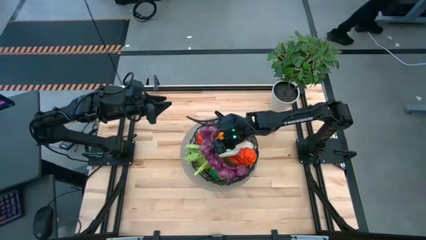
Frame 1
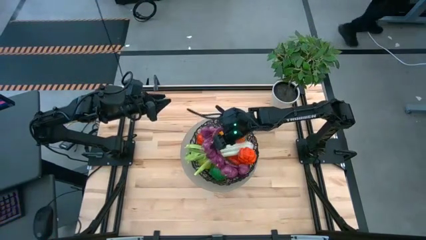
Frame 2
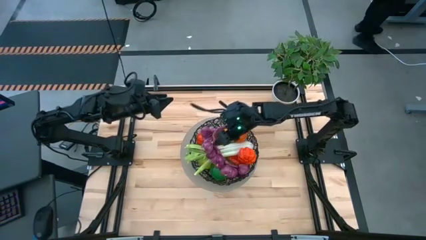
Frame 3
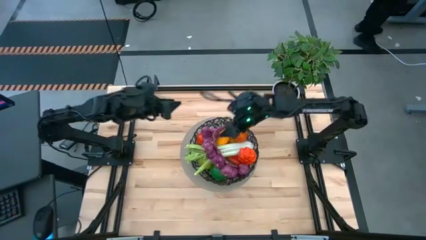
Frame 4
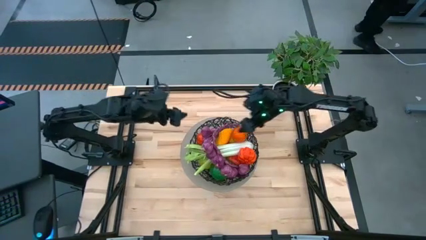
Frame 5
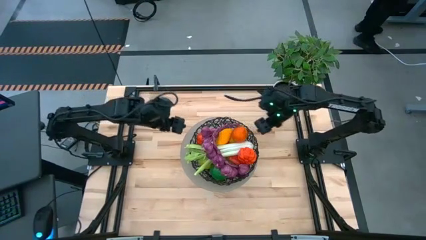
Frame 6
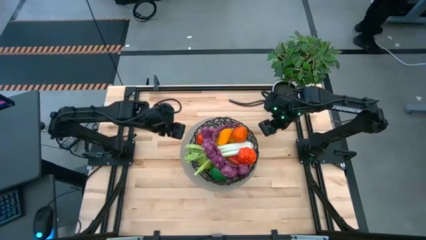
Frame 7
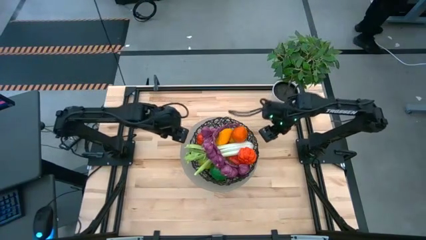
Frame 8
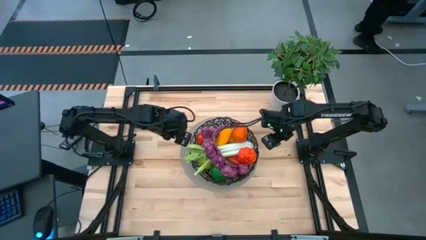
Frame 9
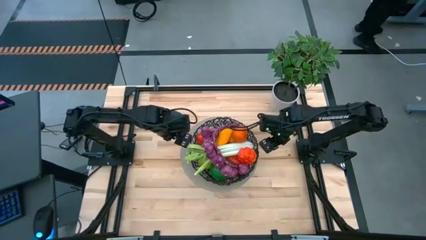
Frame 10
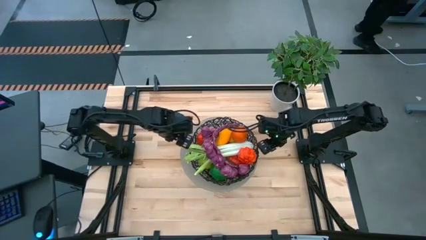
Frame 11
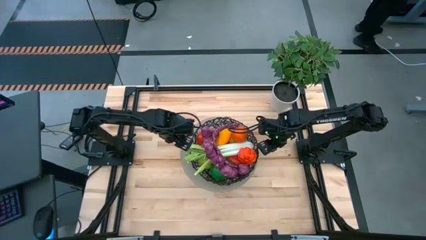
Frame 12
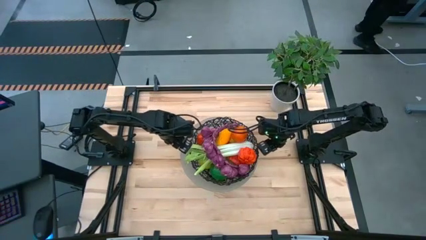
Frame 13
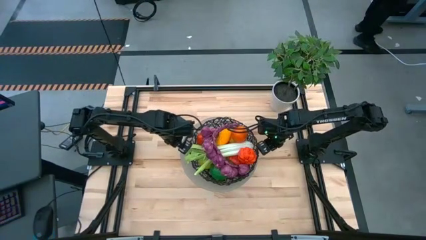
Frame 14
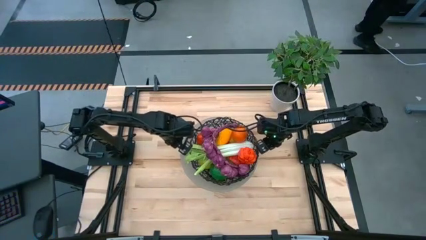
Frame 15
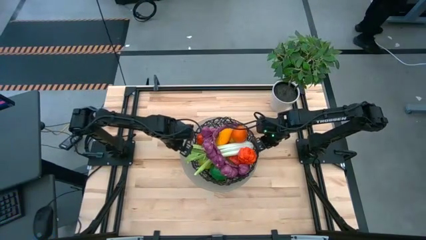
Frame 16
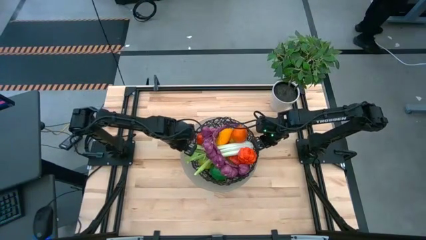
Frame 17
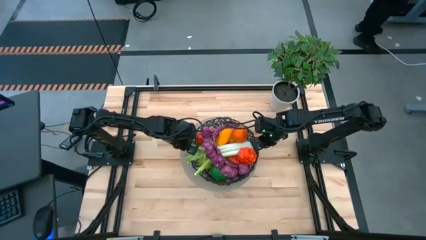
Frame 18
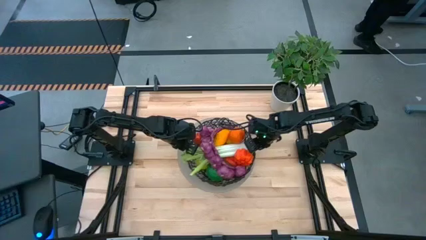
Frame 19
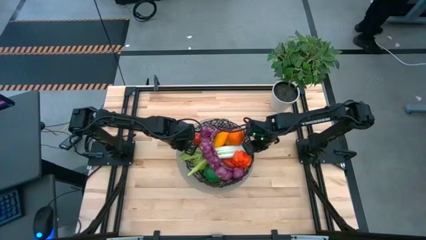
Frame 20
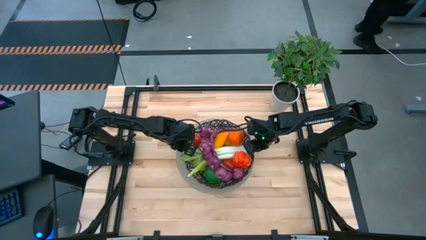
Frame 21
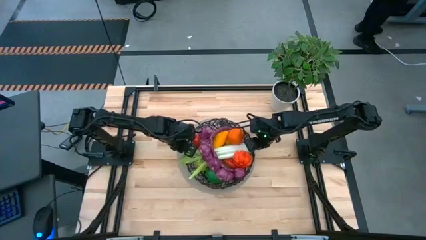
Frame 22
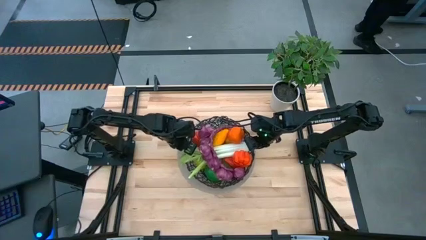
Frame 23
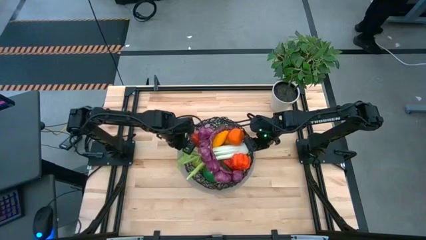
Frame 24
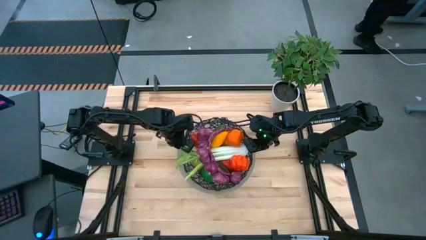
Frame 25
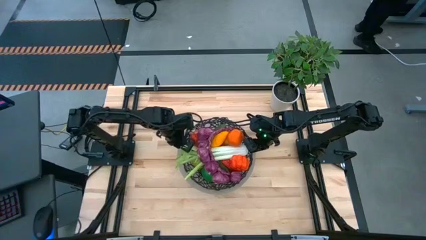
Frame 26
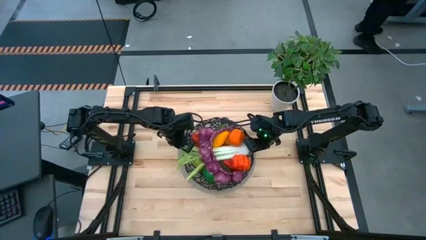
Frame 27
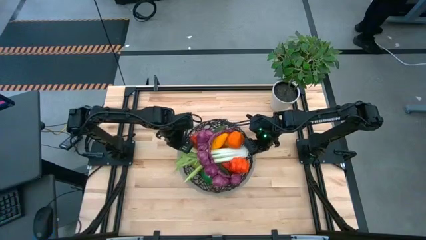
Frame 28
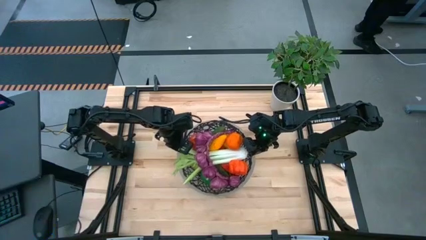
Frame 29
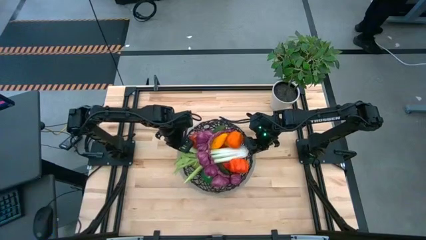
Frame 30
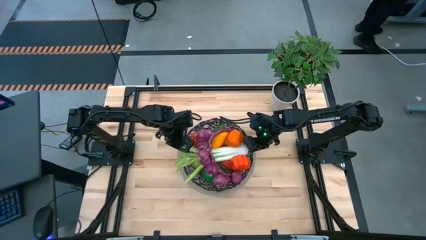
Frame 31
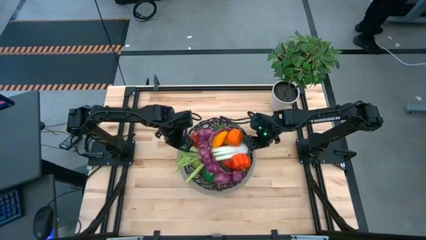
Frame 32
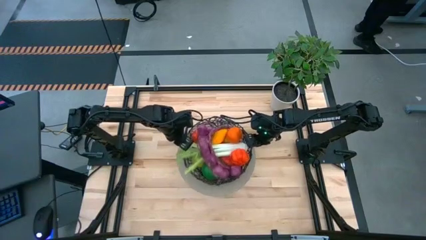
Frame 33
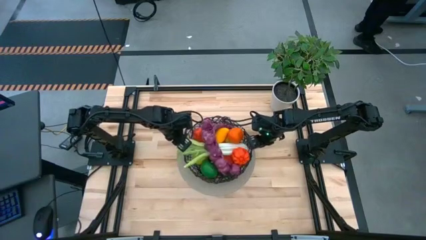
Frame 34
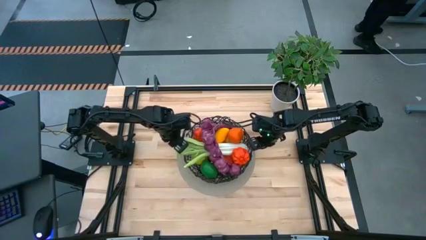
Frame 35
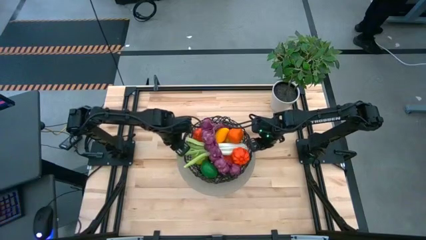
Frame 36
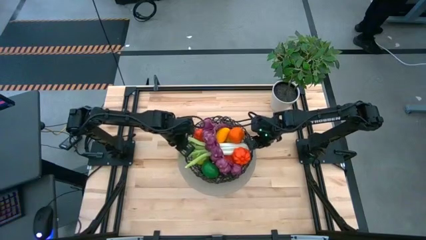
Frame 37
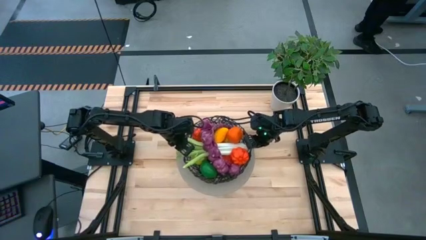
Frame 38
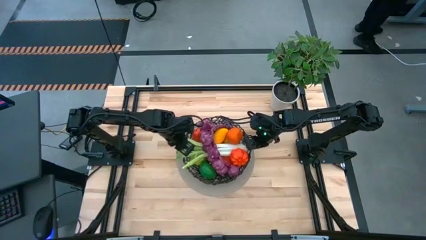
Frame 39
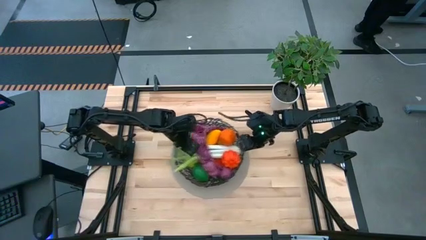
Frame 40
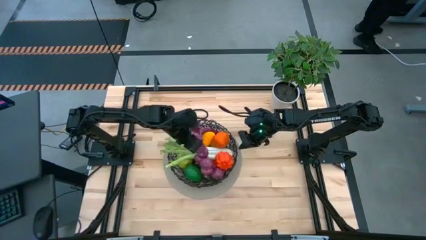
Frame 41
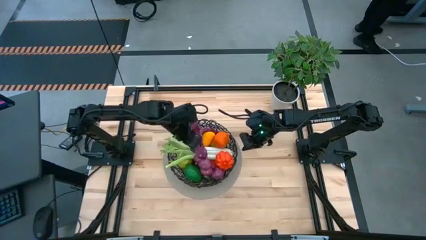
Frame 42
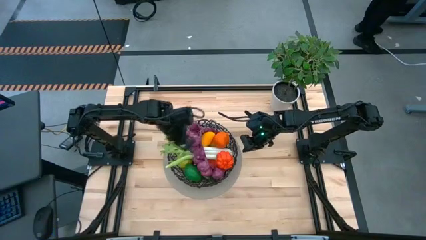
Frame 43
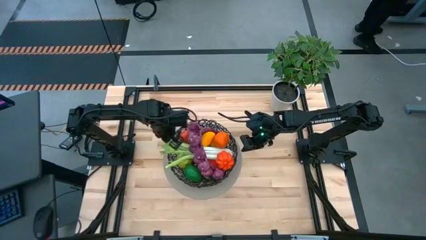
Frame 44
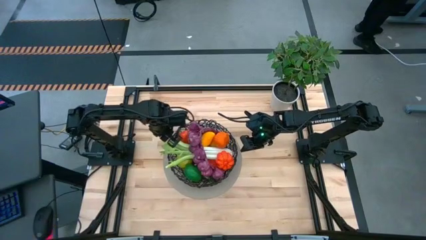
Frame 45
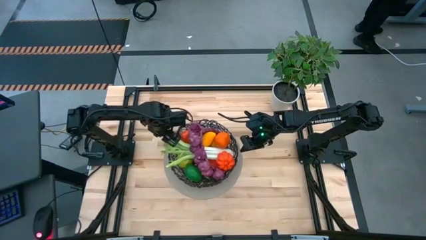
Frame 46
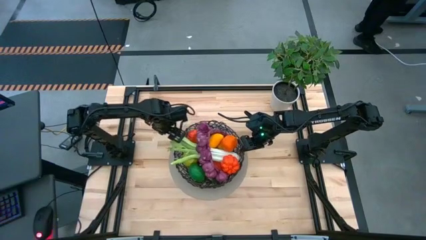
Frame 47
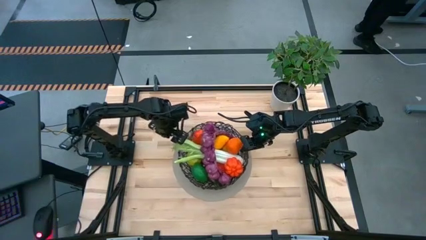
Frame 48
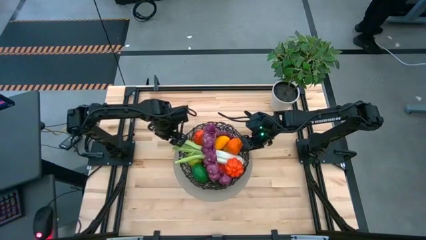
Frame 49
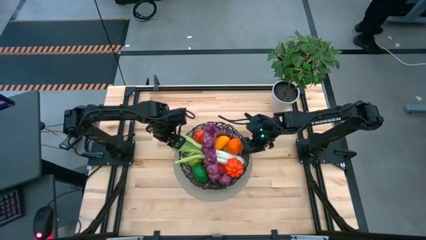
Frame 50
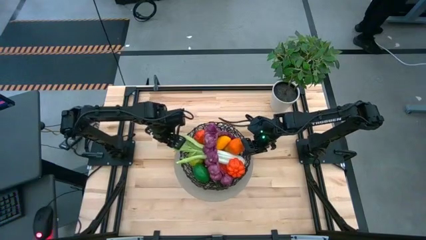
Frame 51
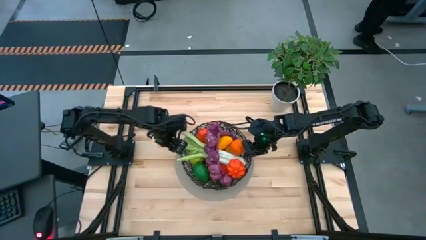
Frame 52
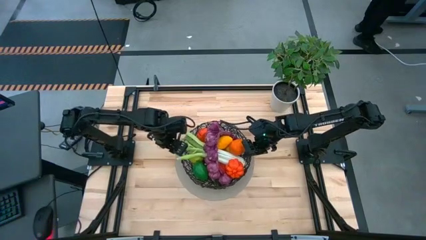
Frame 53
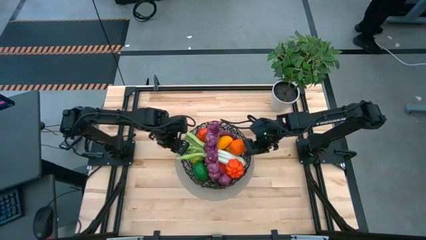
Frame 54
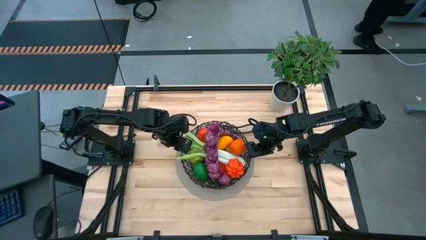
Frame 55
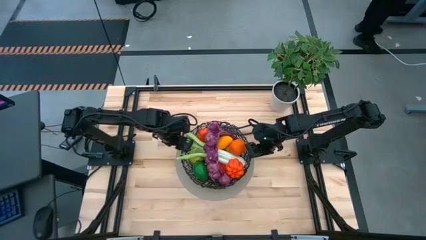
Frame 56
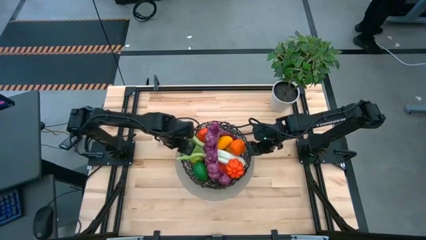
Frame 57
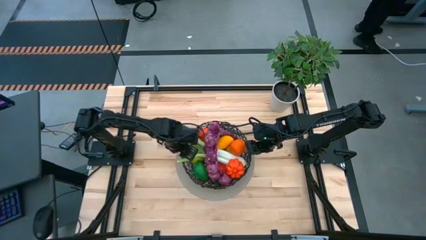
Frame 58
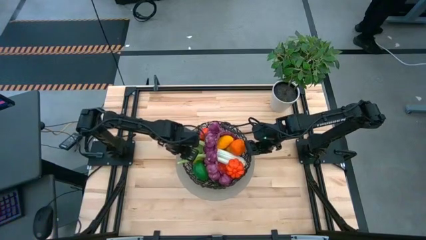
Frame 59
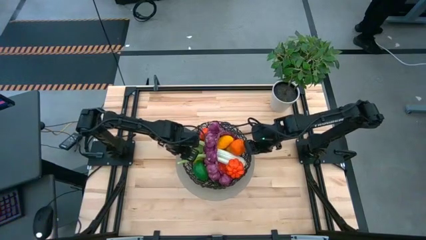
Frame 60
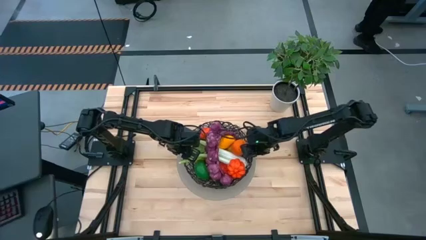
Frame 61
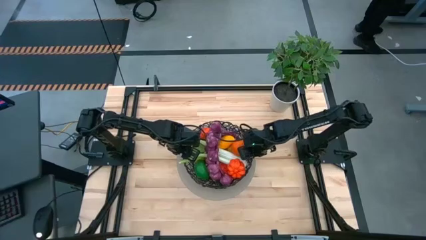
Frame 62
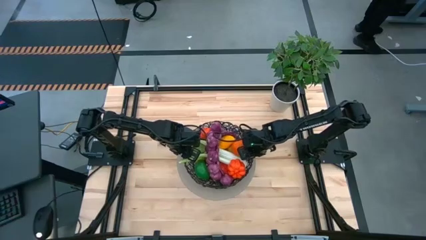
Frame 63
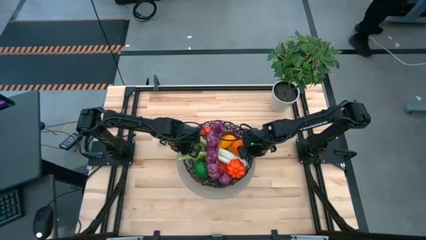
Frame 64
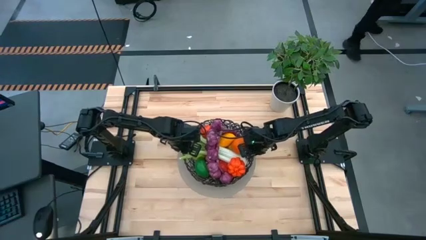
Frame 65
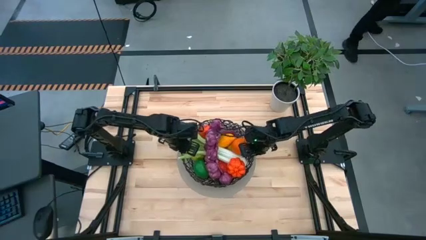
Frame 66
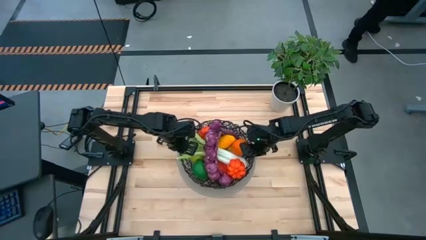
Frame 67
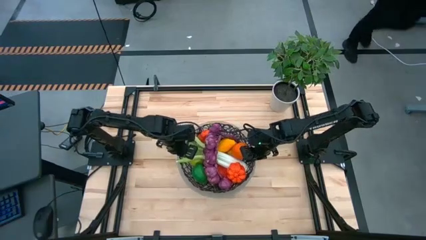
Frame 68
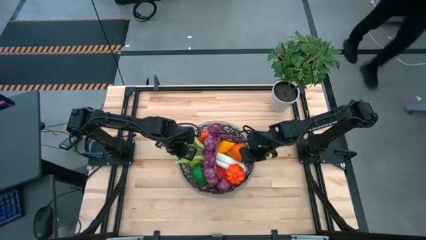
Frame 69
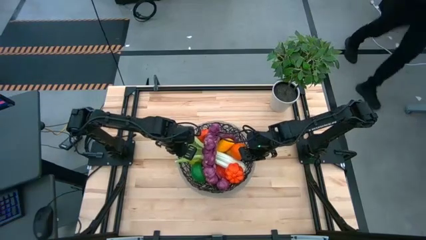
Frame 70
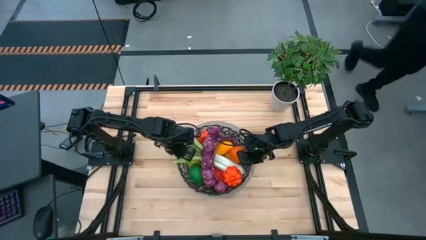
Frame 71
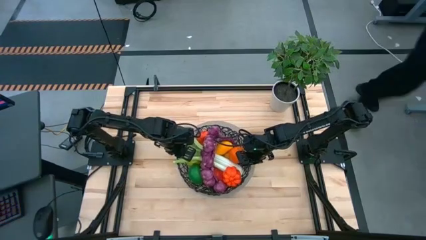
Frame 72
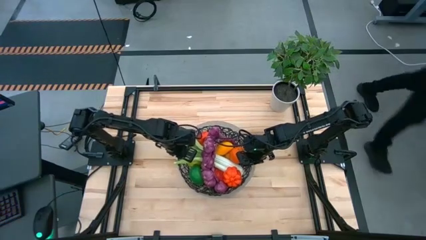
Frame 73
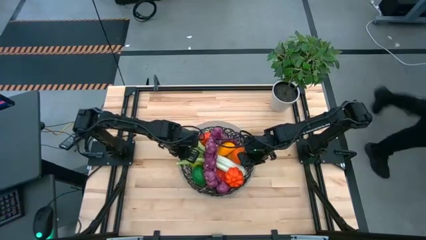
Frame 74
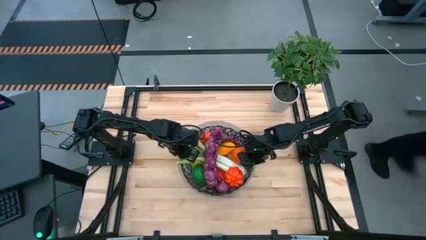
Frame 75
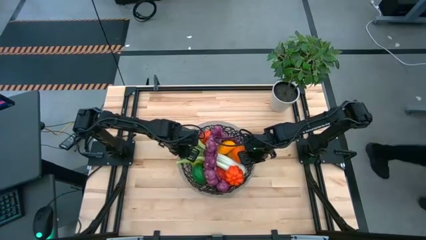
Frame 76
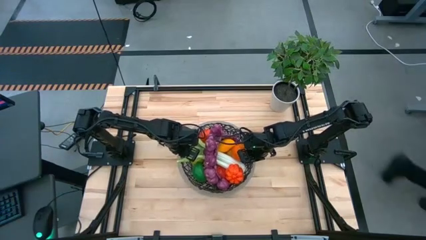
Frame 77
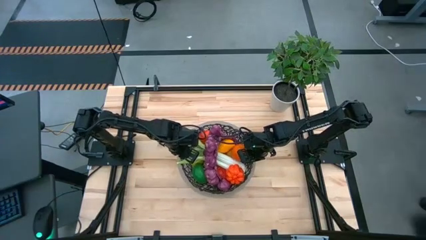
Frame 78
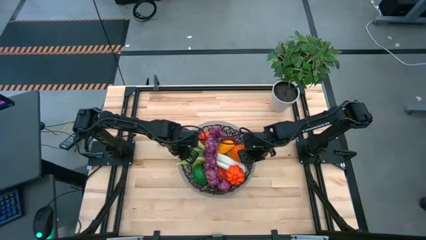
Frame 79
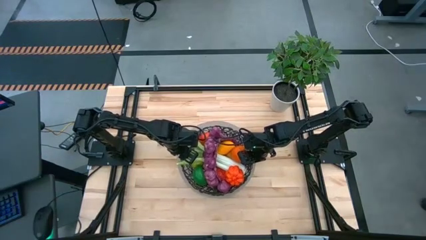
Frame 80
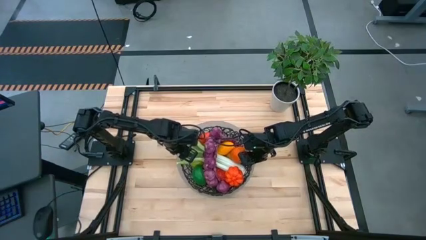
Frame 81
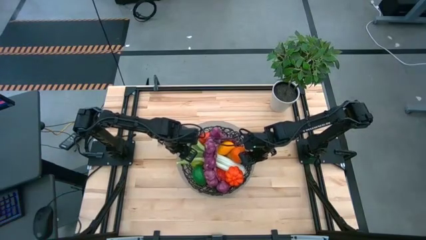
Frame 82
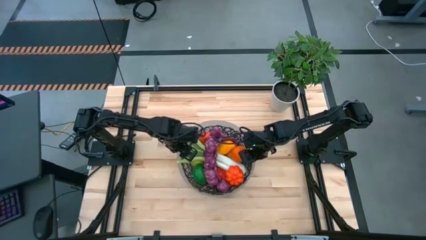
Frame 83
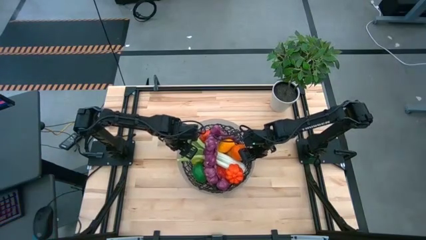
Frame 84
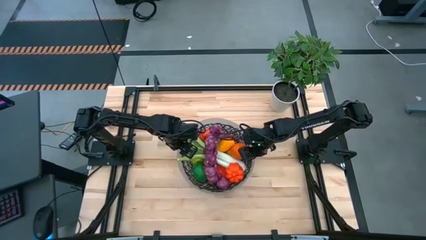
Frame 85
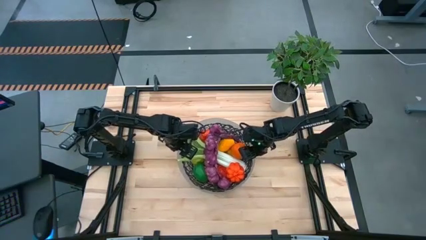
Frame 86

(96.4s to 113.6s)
Task: Build produce basket
Adjust the black wire basket in the center
